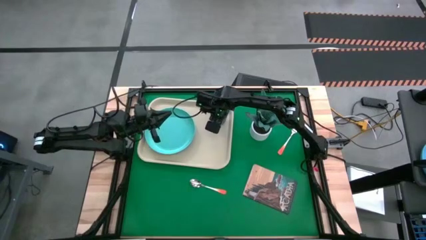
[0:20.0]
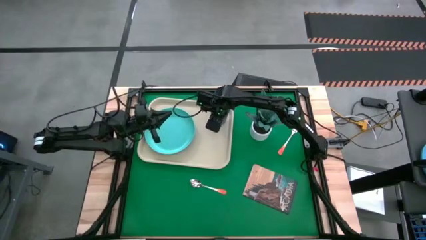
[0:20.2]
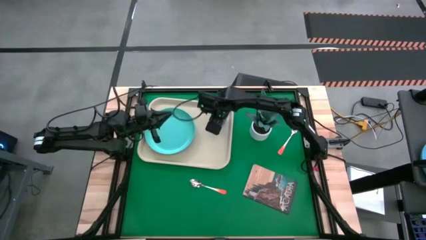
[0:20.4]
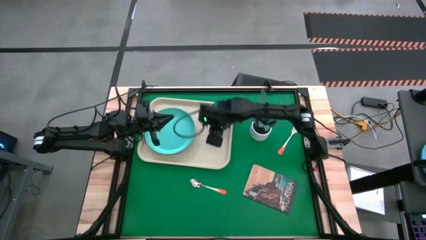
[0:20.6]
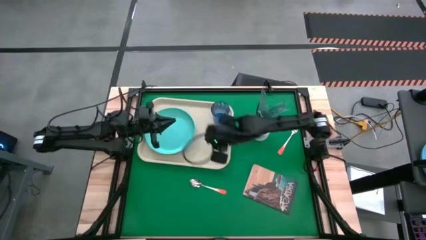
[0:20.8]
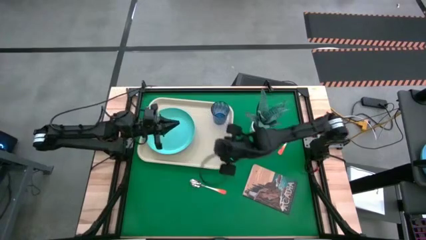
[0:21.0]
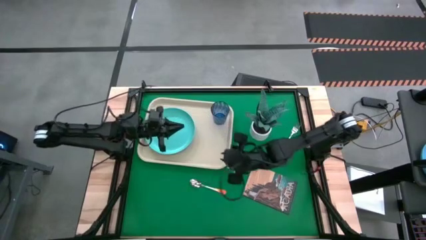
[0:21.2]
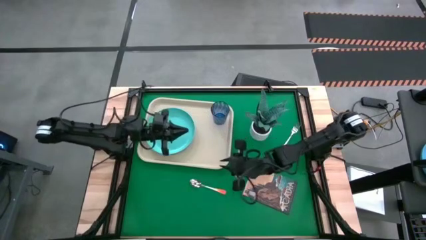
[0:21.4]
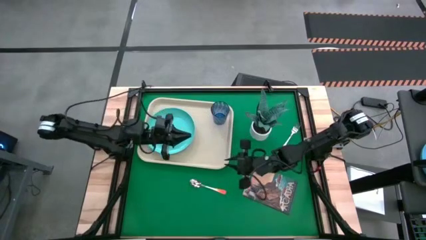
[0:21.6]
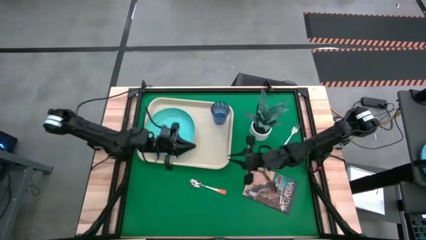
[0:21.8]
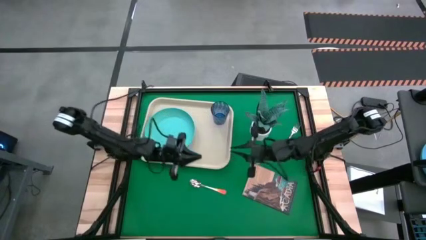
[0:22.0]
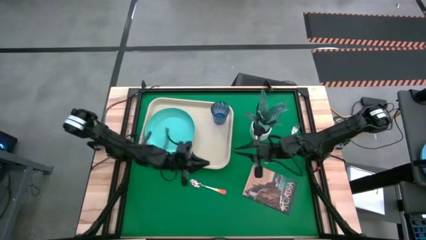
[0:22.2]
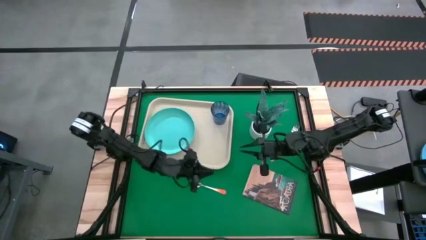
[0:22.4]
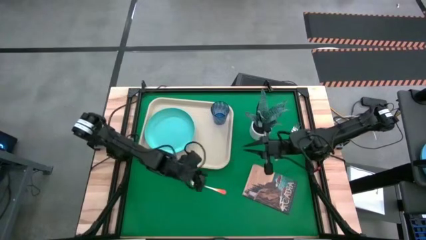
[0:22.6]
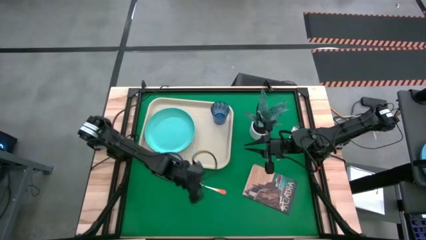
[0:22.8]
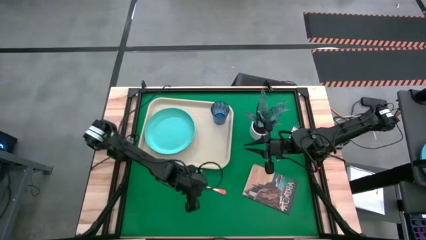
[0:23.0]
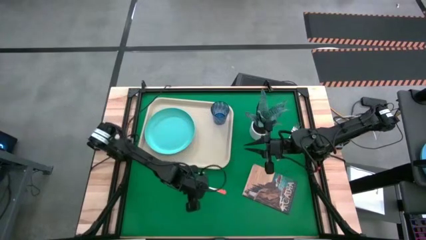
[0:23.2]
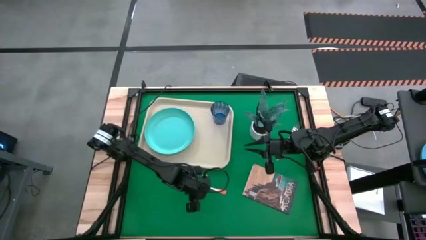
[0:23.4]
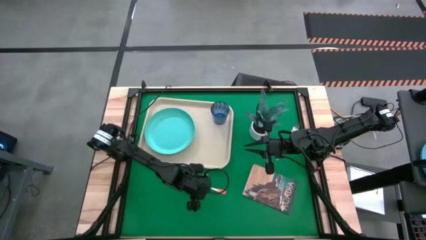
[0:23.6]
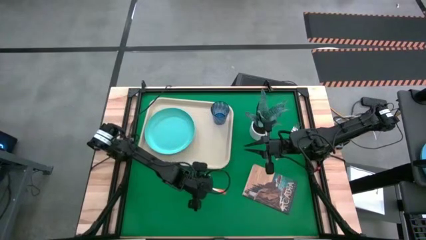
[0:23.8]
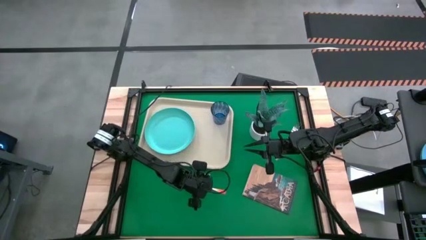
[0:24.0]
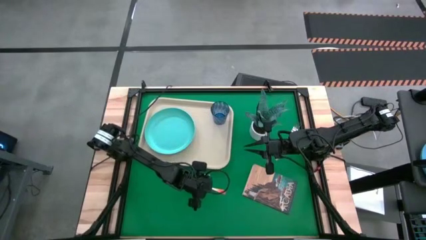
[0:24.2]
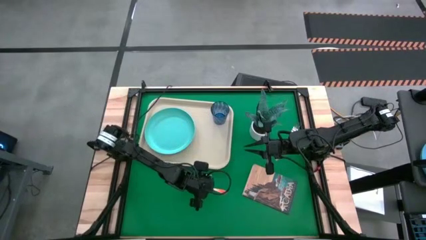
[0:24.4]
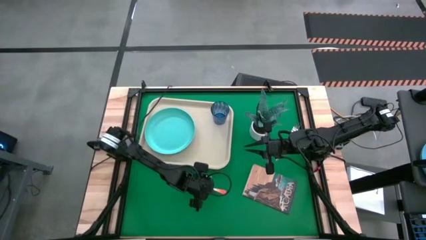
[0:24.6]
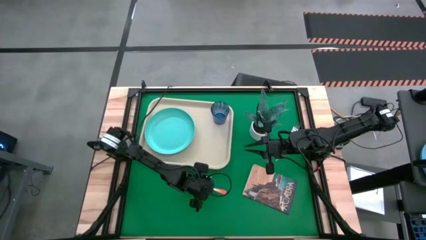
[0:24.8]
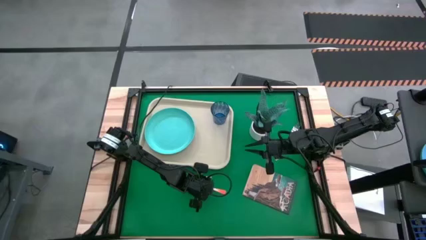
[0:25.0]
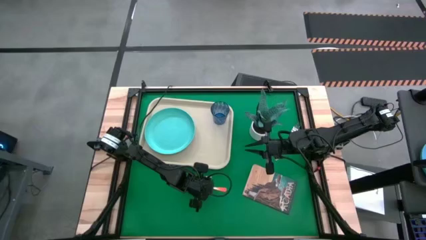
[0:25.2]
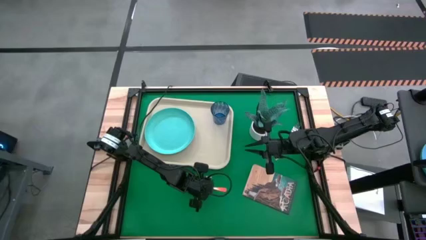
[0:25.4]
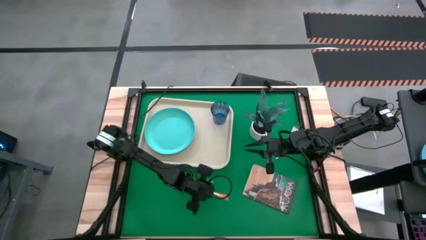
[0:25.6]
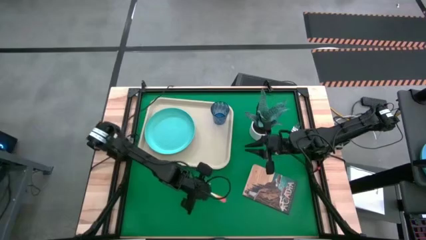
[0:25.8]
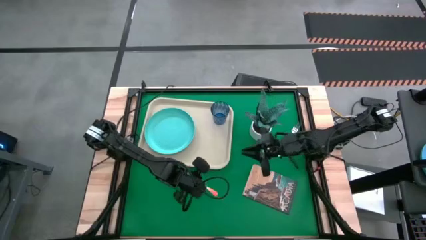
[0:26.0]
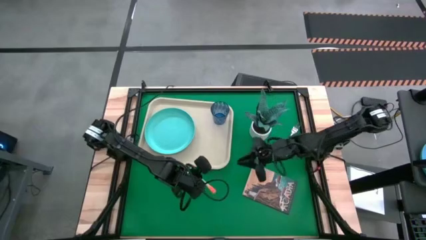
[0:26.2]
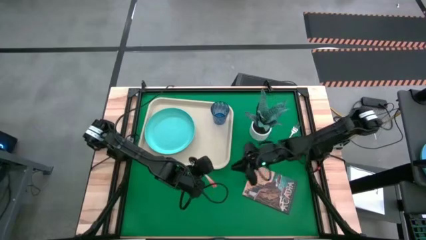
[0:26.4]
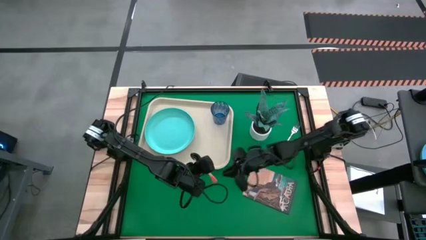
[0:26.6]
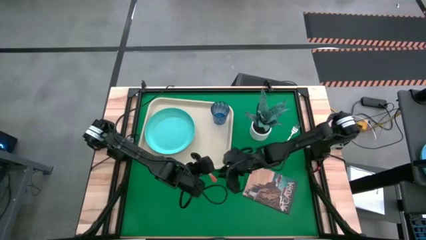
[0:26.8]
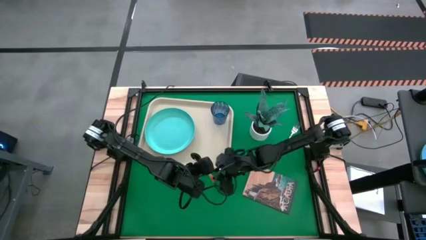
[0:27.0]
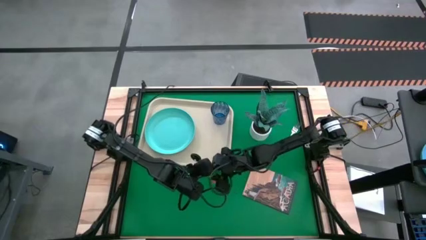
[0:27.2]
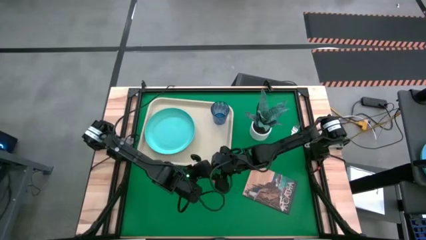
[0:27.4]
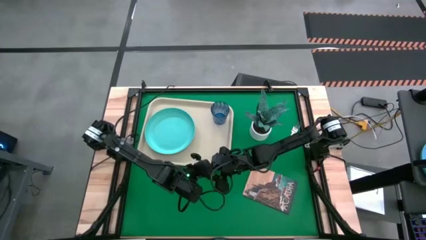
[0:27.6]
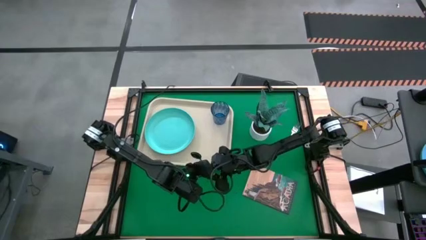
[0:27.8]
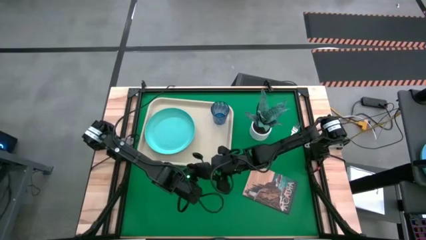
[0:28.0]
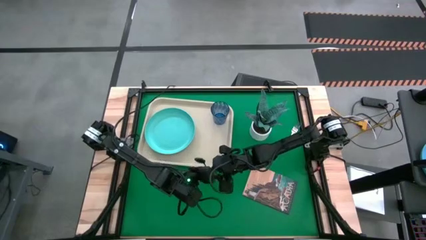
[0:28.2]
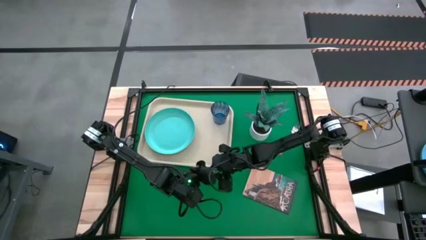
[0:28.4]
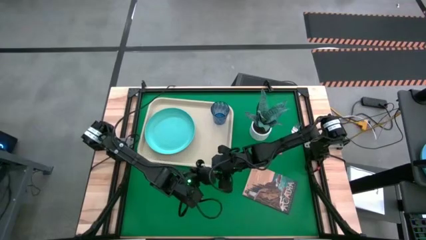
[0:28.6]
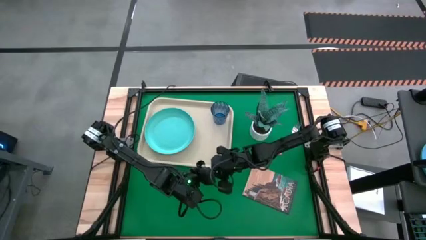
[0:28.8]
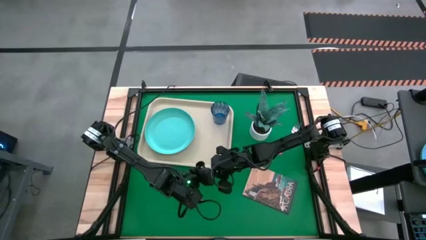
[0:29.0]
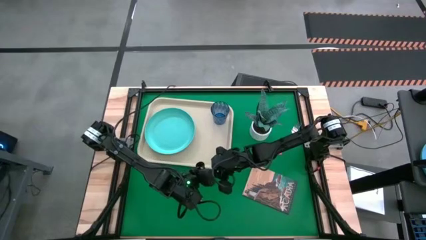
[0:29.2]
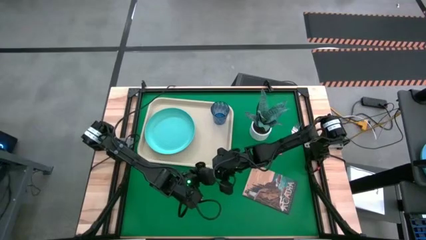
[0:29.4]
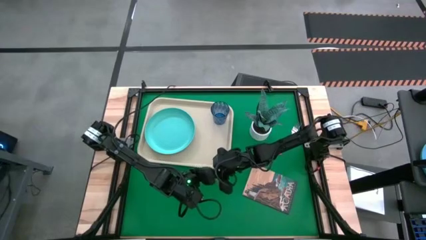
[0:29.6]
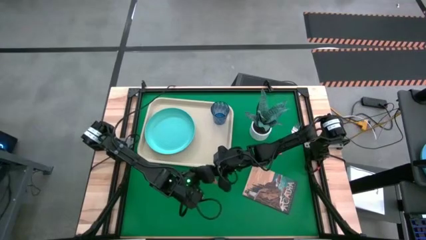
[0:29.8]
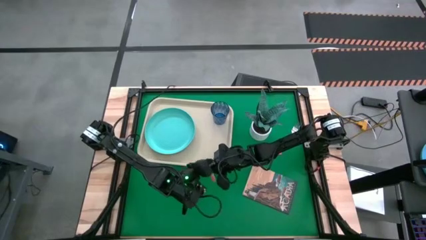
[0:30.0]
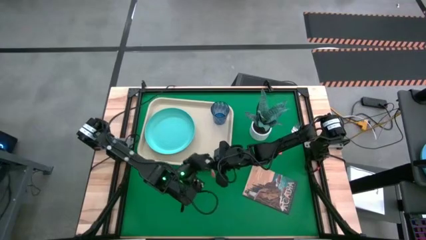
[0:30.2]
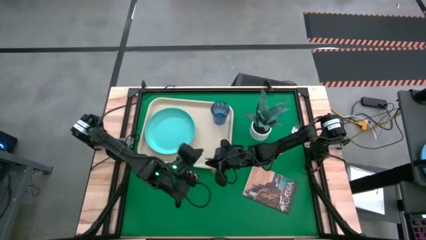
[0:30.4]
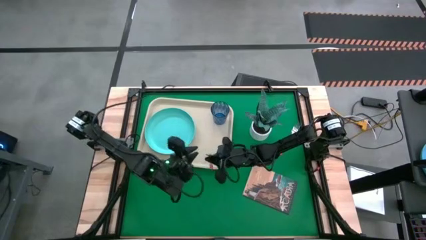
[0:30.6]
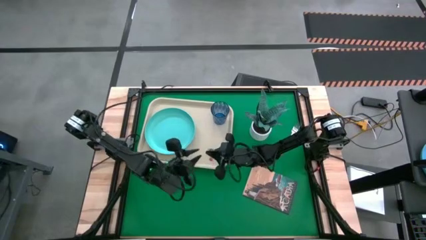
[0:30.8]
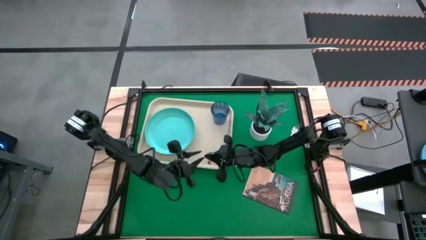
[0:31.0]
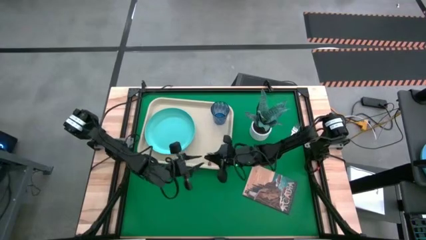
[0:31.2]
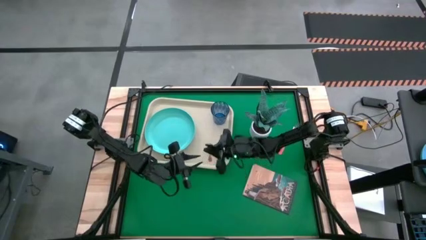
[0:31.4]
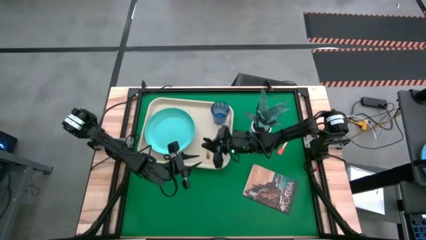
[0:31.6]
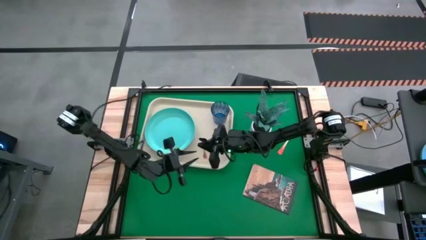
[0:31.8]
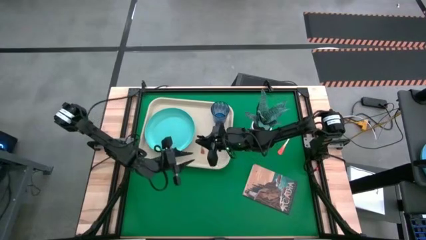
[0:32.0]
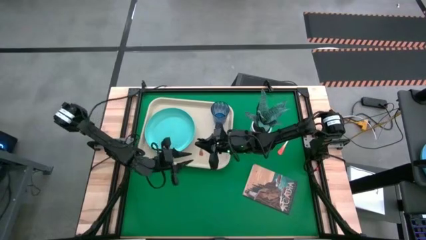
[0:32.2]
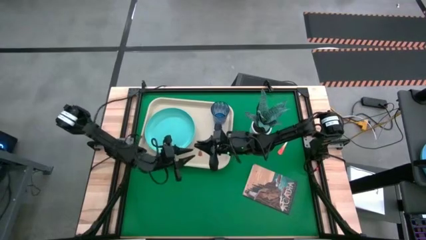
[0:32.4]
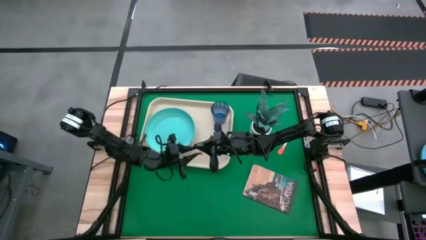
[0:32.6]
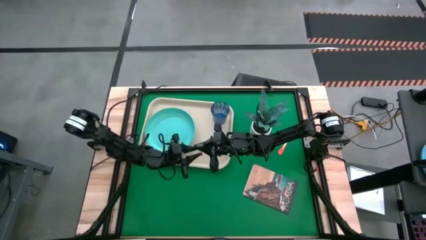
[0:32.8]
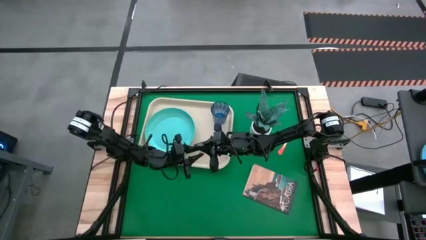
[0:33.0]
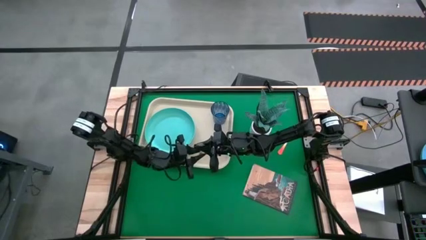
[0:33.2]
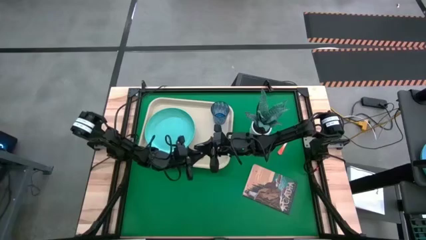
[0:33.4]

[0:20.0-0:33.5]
Task: Pick and place plate/cup/fork/spoon on tray
Put the orange spoon on the gray serving tray
